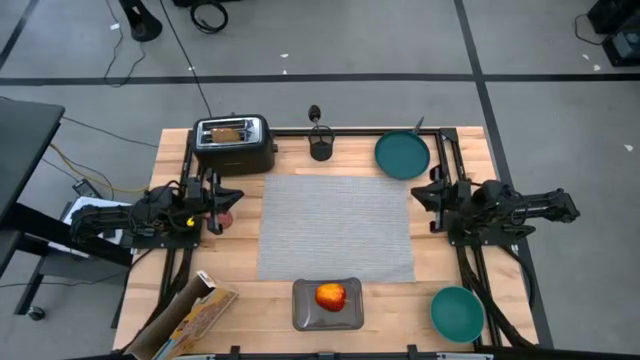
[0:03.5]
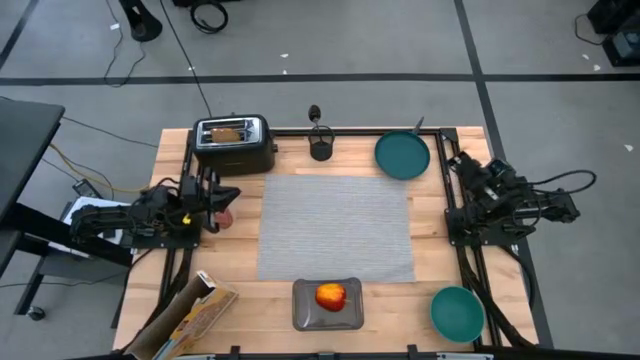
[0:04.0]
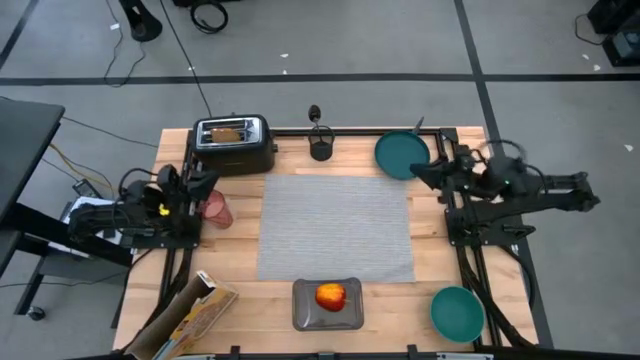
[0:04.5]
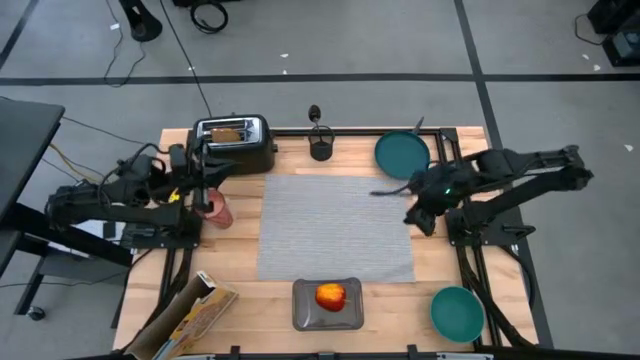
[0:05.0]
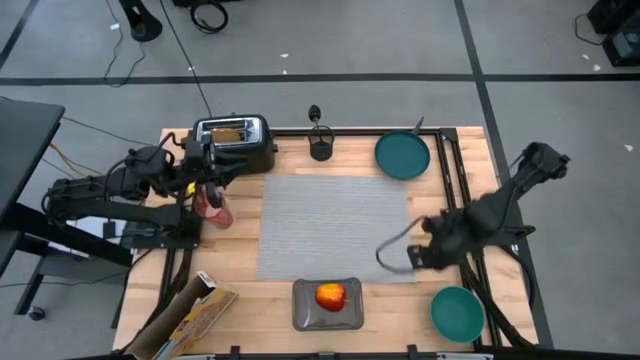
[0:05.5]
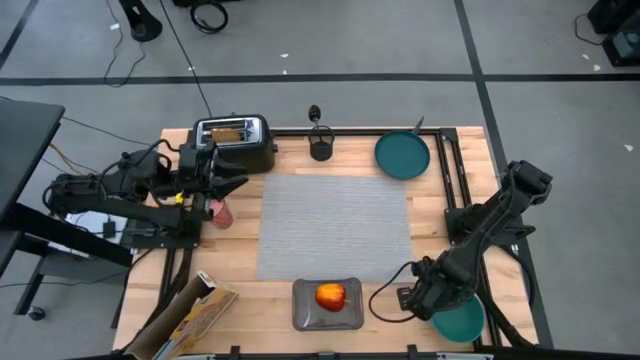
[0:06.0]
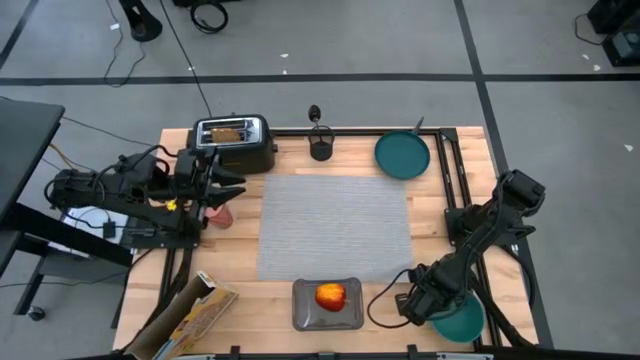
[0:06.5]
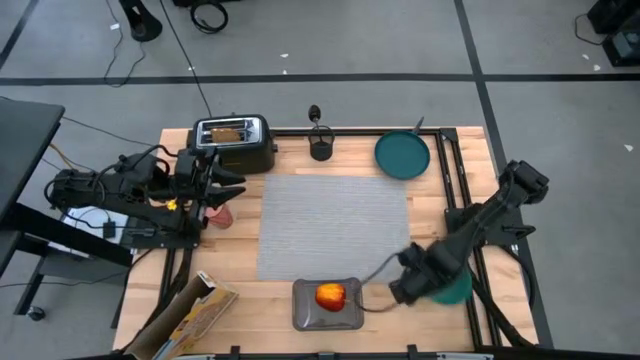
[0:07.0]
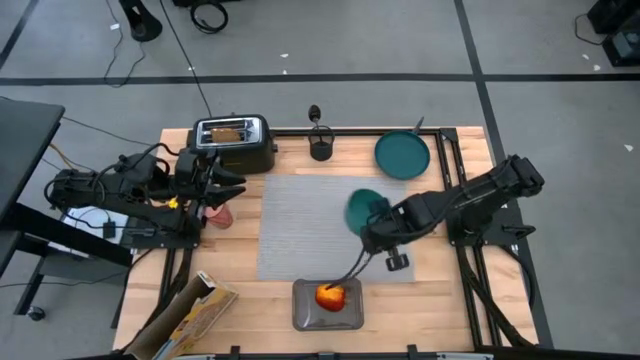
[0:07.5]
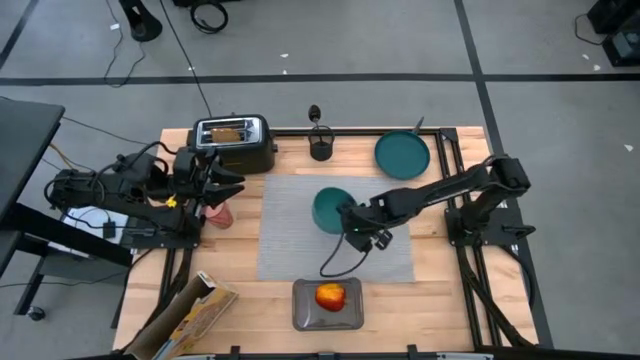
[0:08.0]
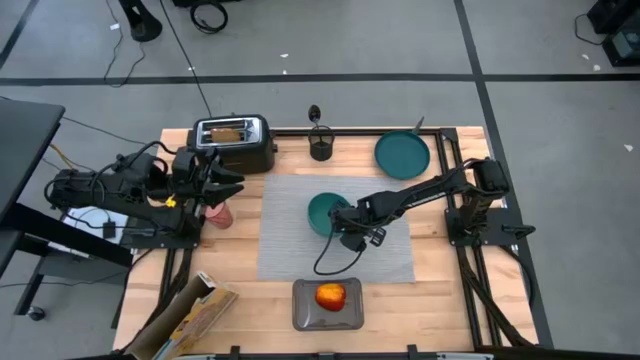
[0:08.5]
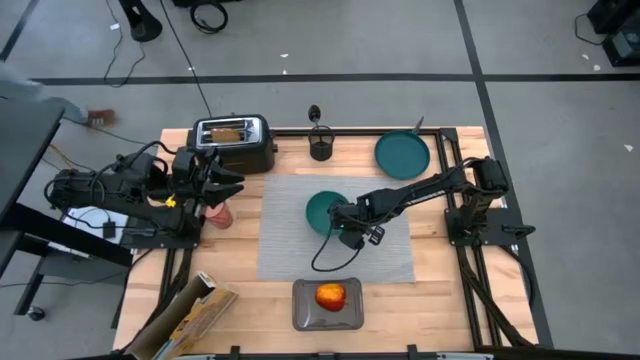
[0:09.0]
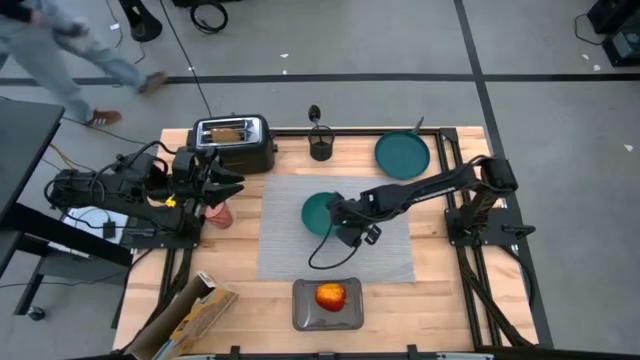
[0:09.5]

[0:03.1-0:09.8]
Task: Arrange a breakfast setting
Put the green bowl on the gray tablemat

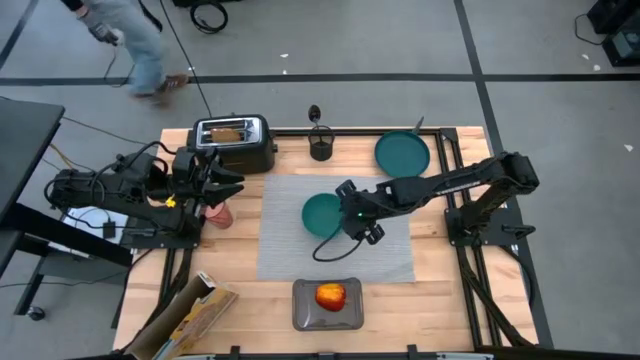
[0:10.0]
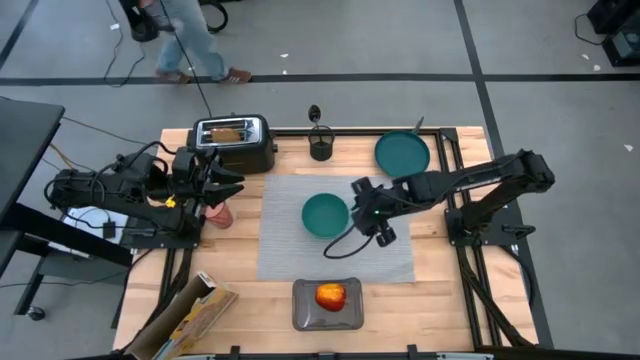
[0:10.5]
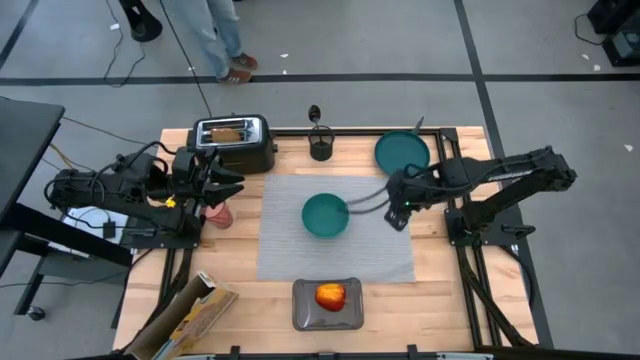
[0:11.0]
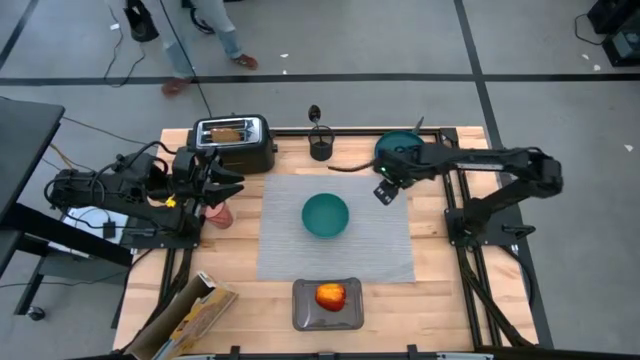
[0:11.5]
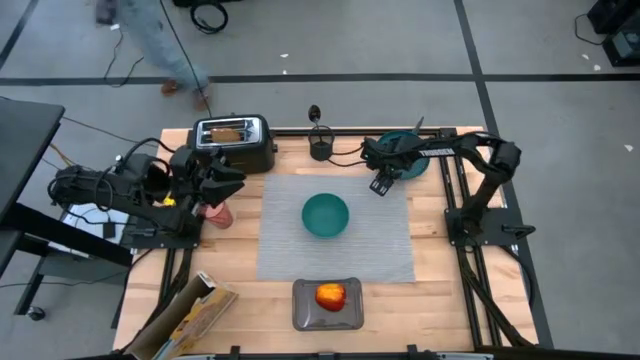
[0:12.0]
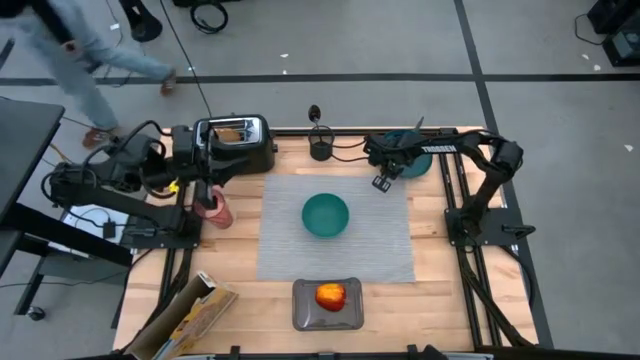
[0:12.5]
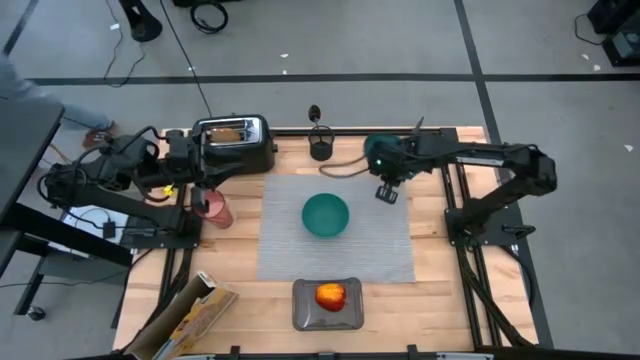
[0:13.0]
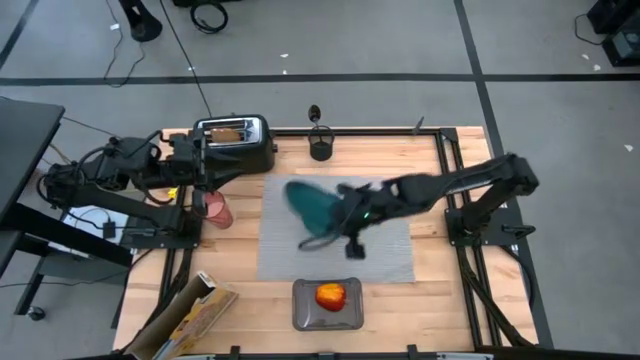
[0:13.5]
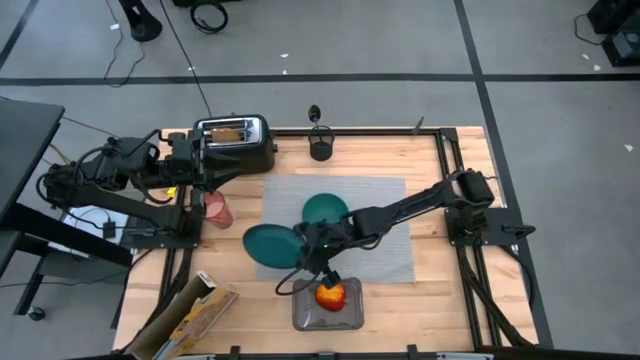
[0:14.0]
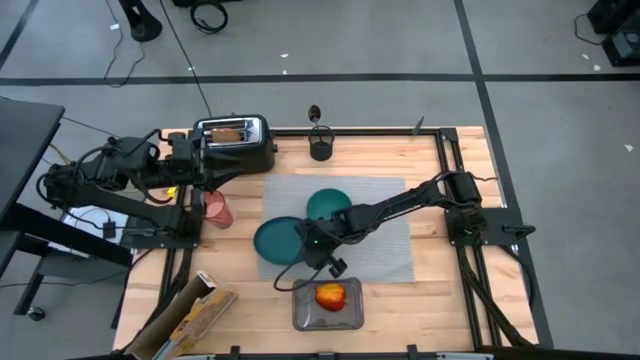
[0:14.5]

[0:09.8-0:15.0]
Put the blue plate on the gray tablemat to the left of the green bowl

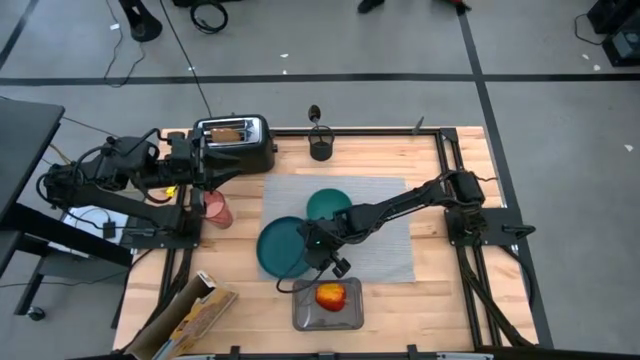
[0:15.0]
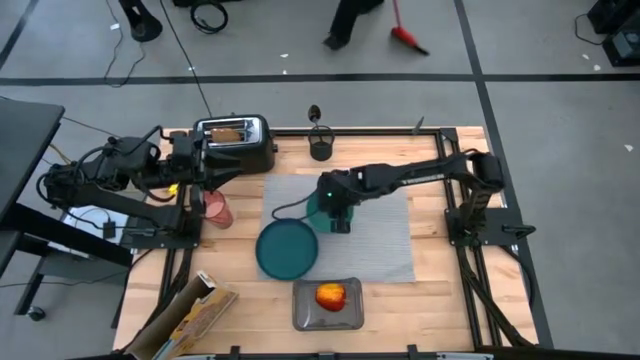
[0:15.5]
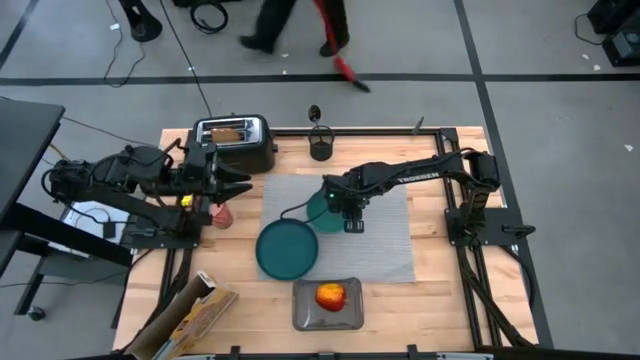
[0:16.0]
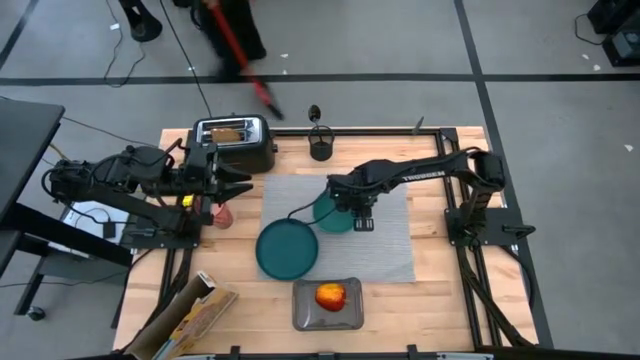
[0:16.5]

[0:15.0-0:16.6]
Adjust the green bowl

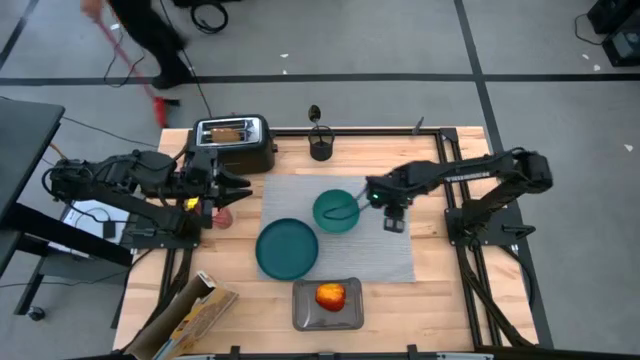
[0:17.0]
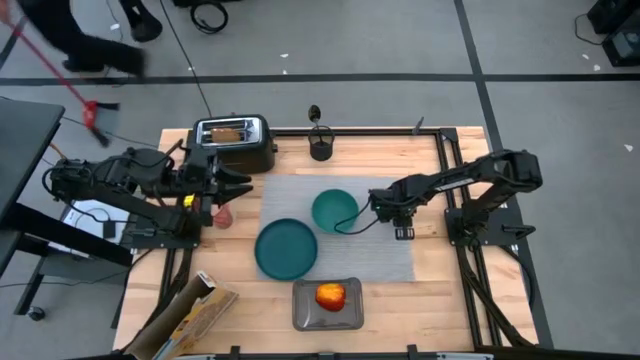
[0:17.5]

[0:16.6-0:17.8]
Adjust the gray tablemat

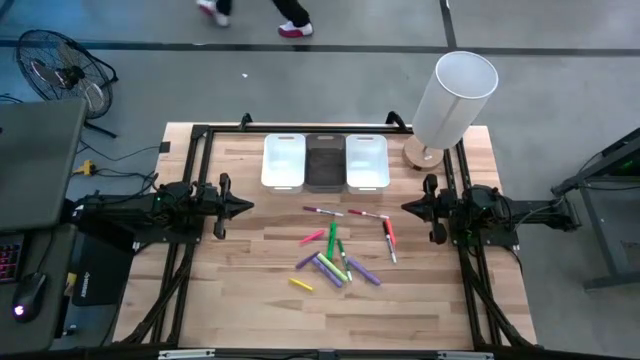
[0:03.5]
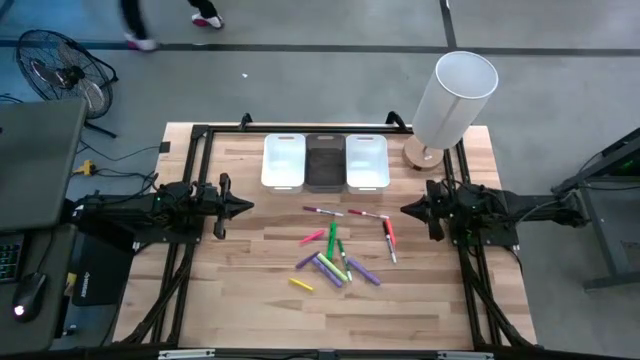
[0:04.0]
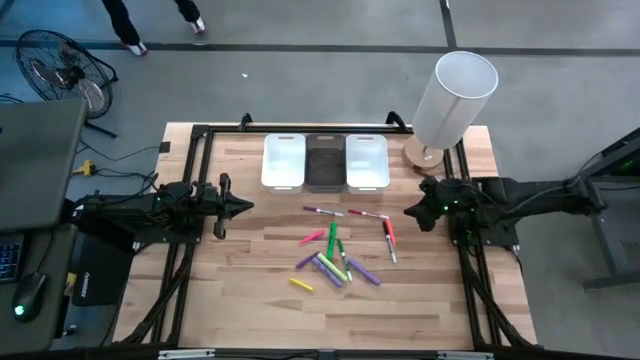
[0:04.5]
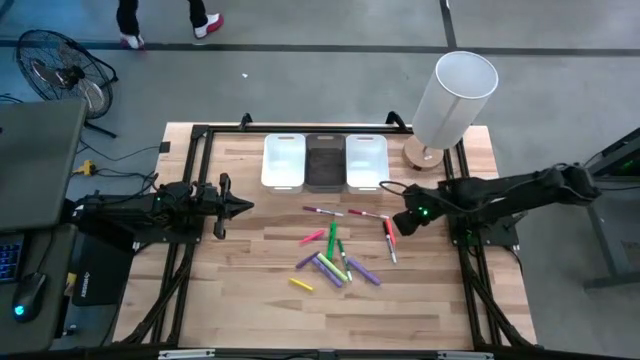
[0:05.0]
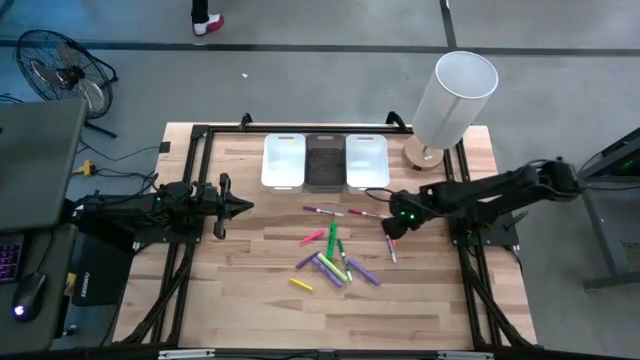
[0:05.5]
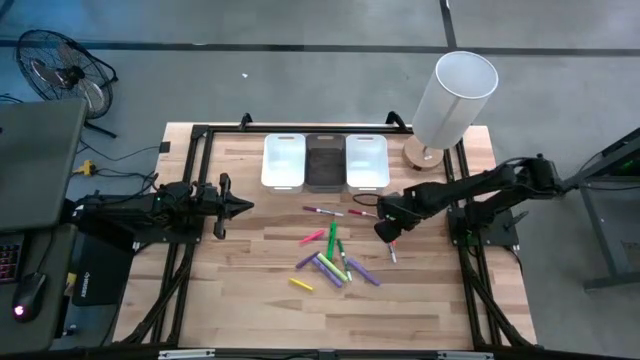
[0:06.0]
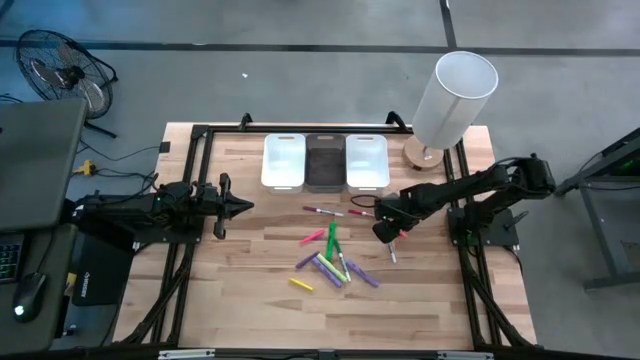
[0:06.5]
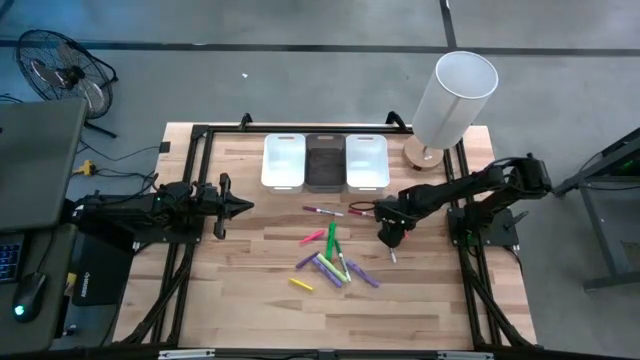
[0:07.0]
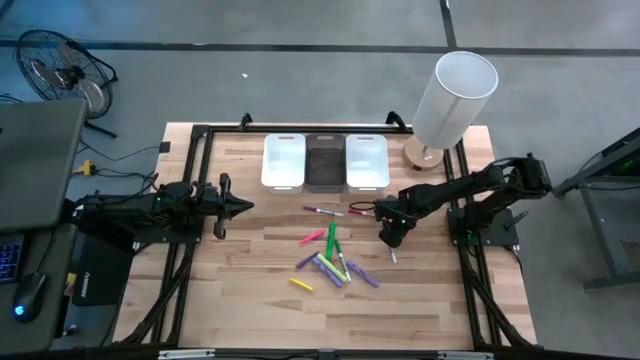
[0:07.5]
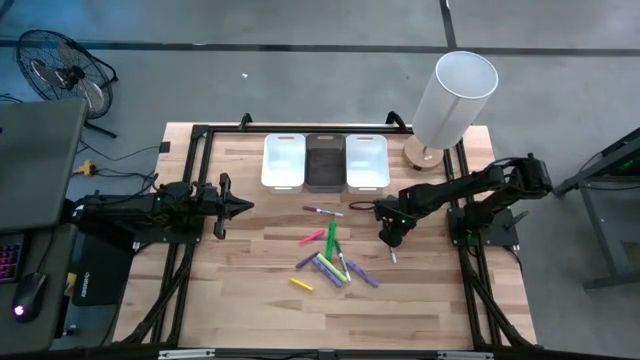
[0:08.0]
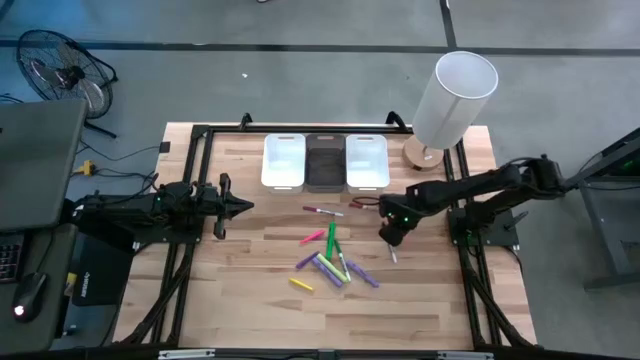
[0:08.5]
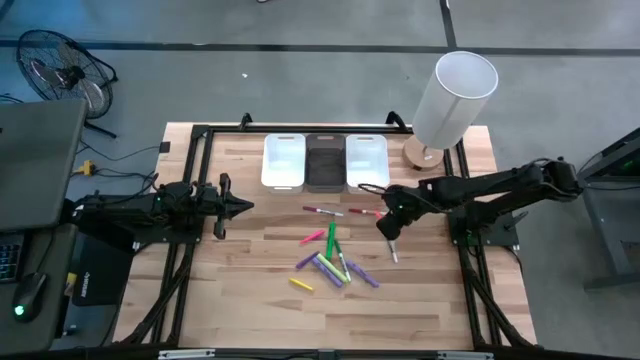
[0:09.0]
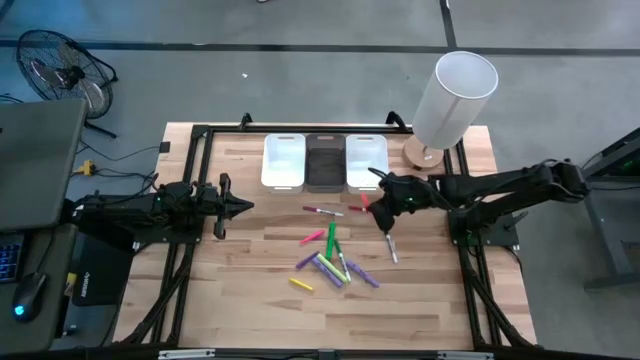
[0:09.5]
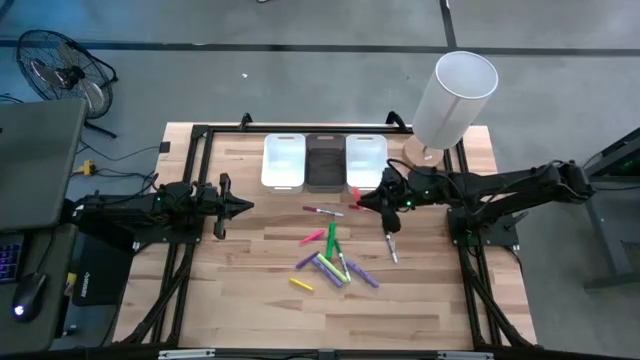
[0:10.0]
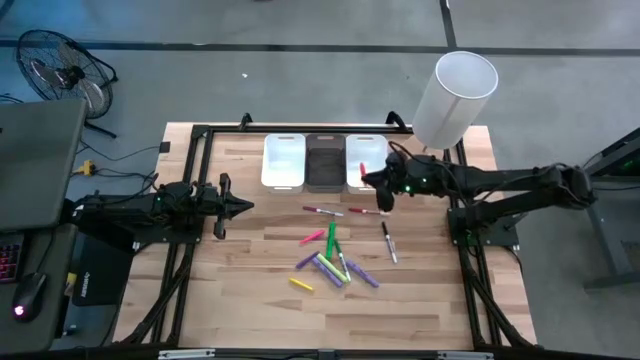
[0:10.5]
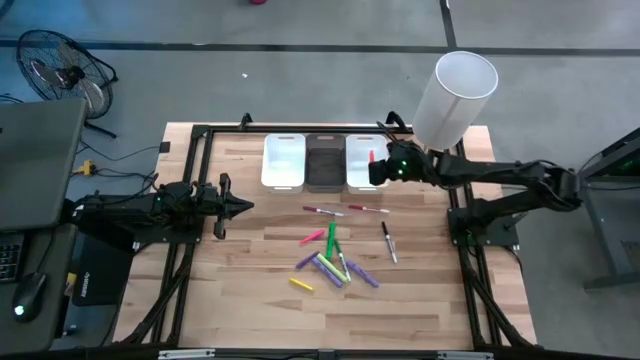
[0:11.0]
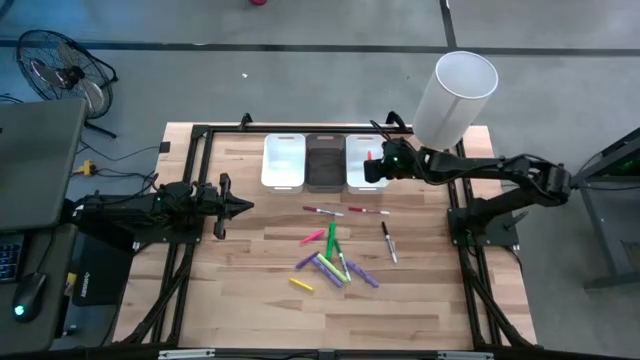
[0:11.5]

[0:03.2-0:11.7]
Task: Pick & Place Markers
Put the orange pen into the right white bin
